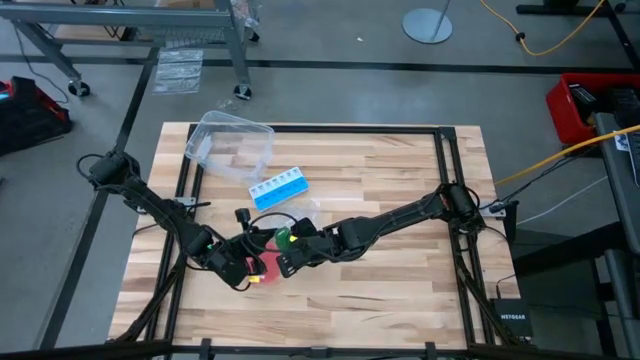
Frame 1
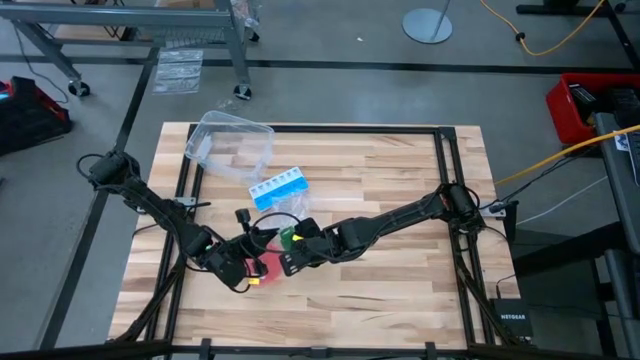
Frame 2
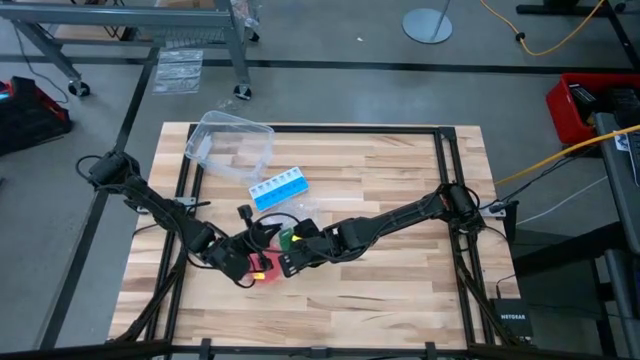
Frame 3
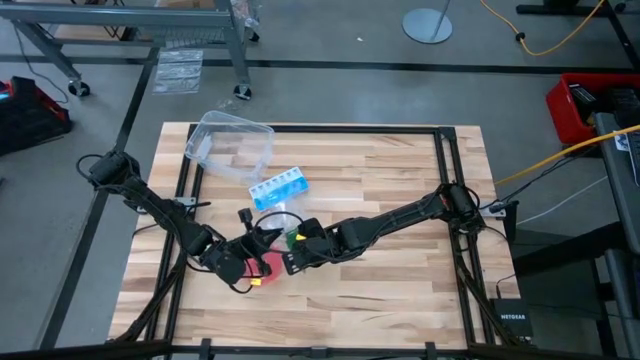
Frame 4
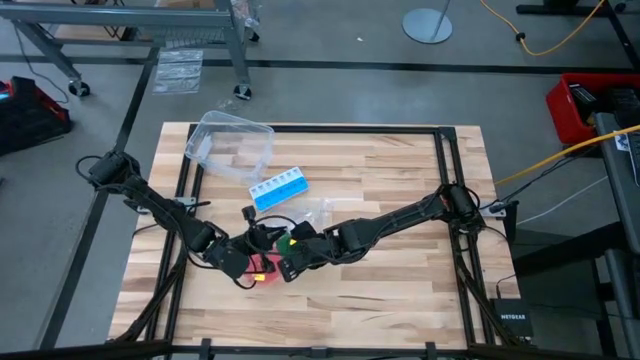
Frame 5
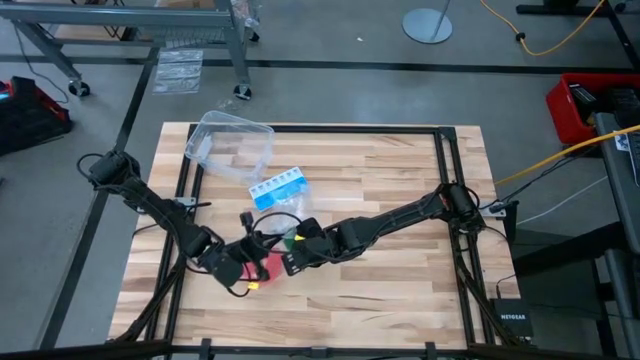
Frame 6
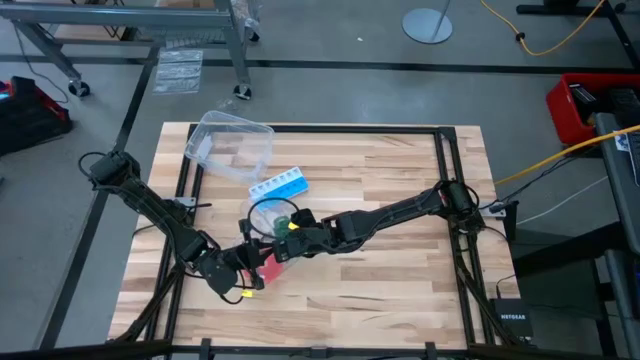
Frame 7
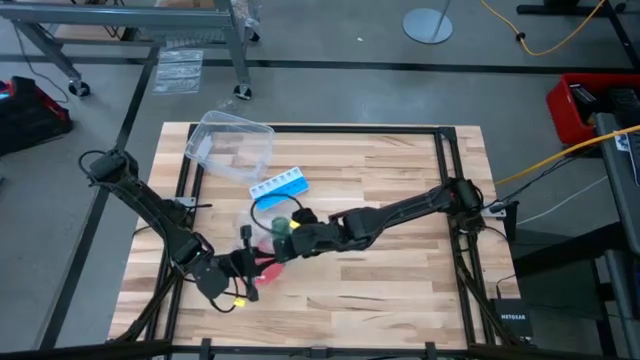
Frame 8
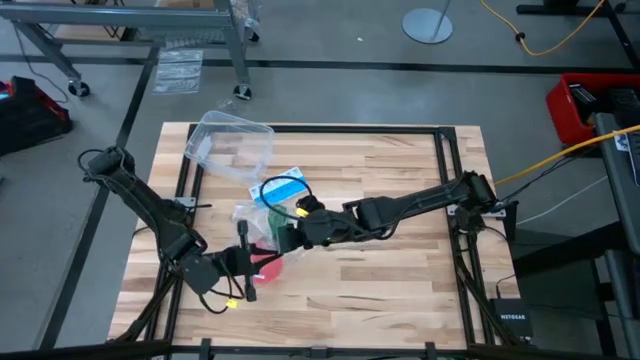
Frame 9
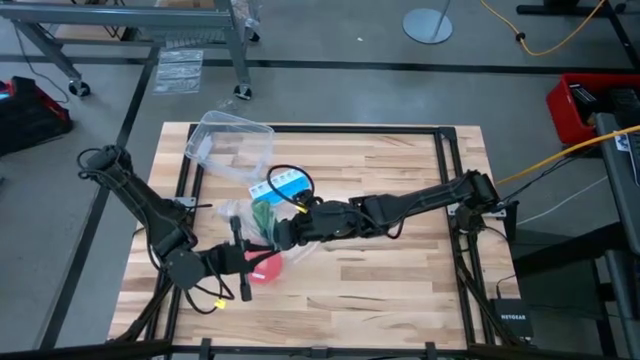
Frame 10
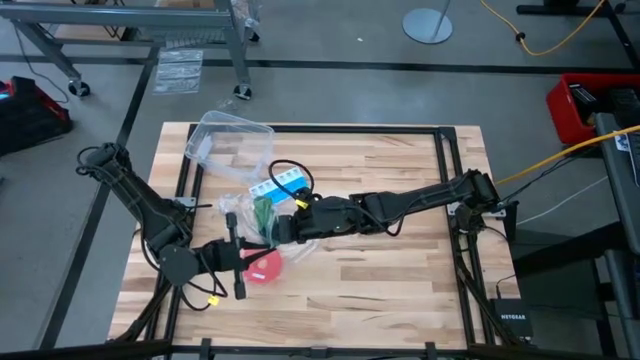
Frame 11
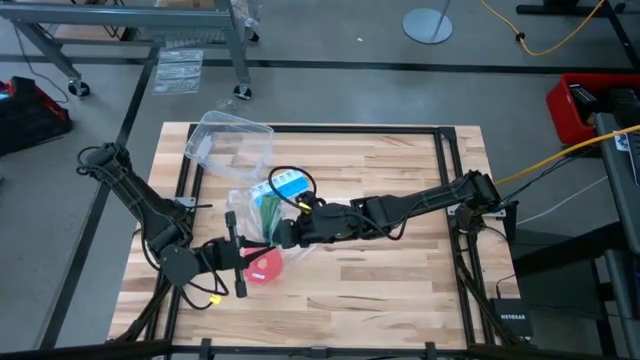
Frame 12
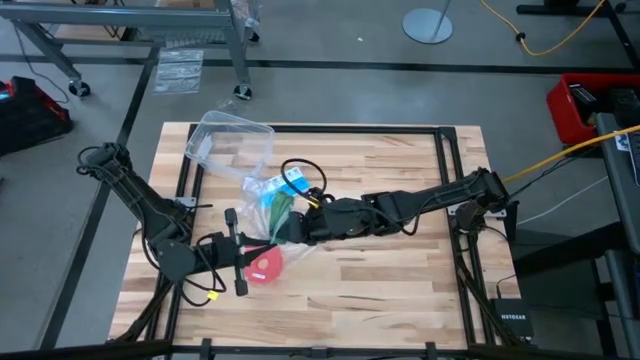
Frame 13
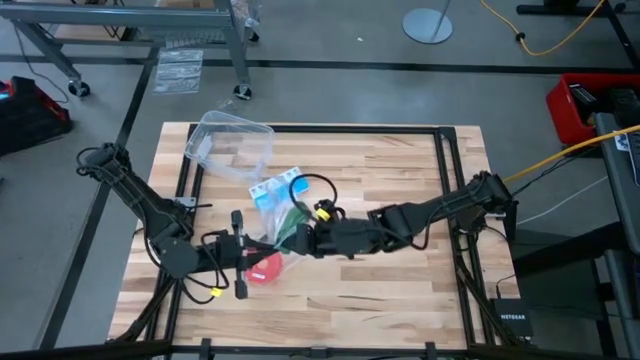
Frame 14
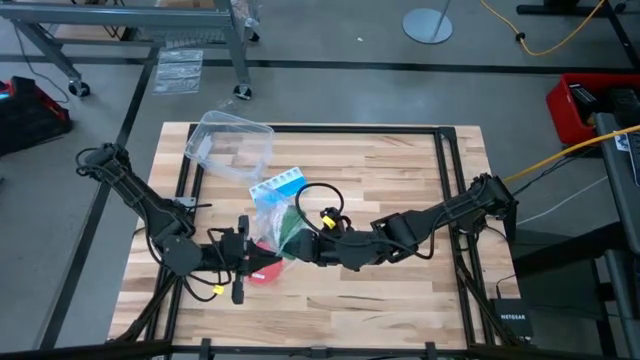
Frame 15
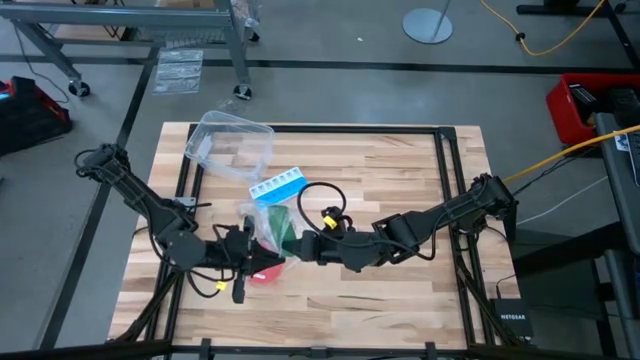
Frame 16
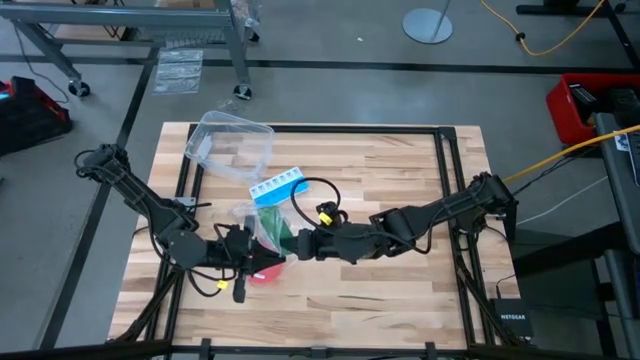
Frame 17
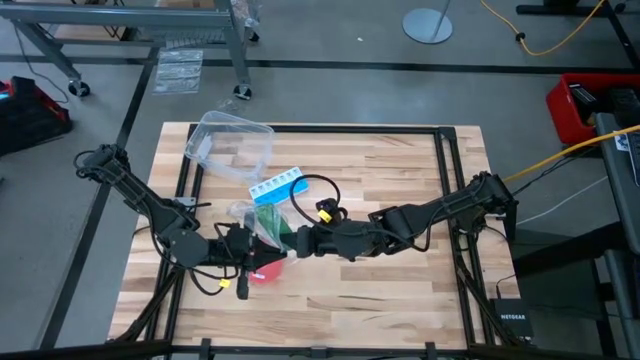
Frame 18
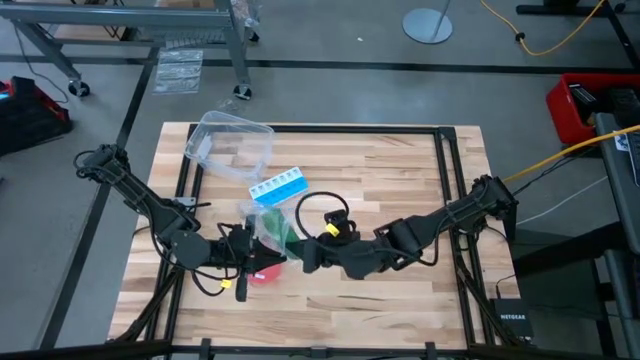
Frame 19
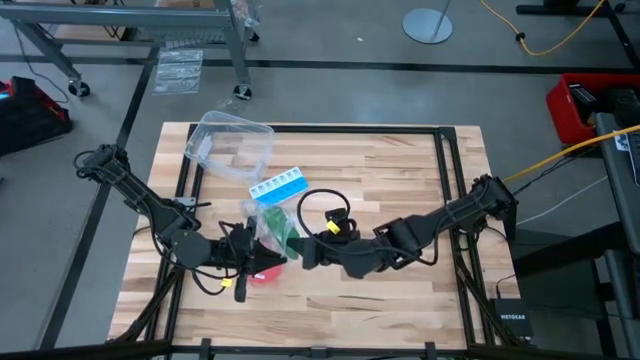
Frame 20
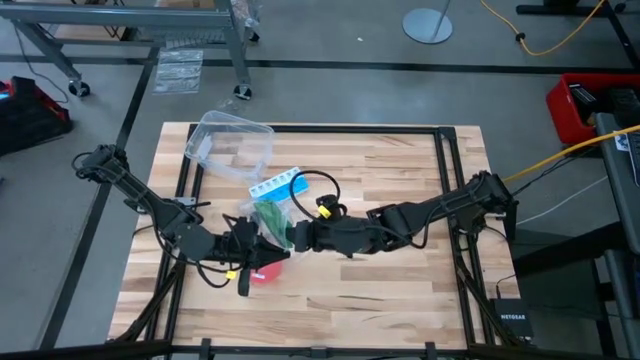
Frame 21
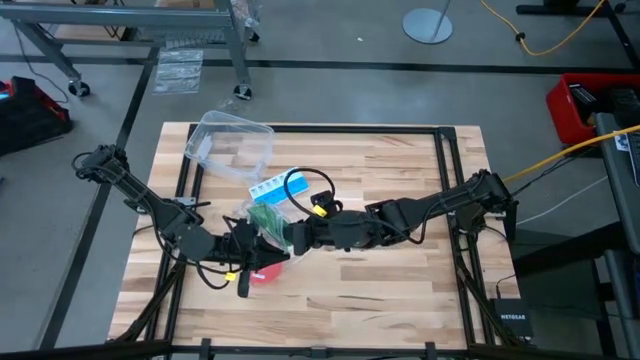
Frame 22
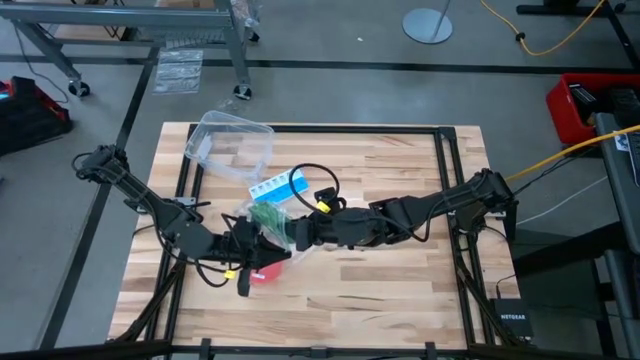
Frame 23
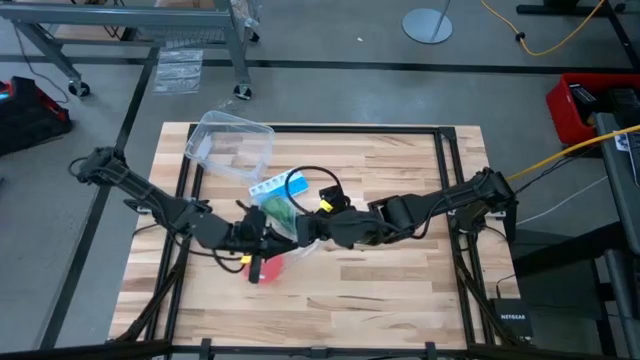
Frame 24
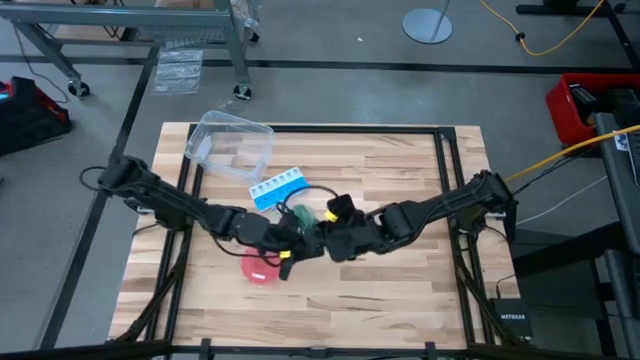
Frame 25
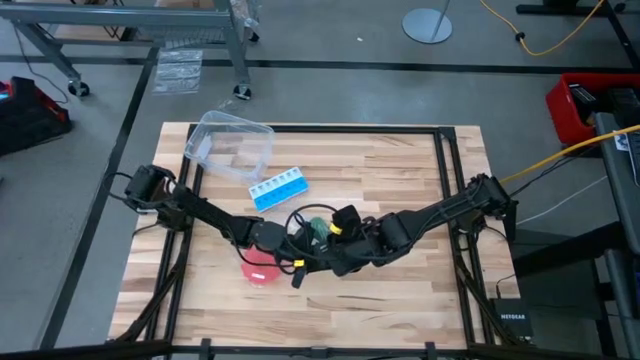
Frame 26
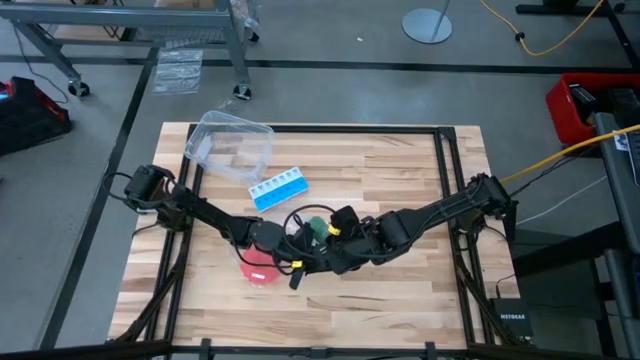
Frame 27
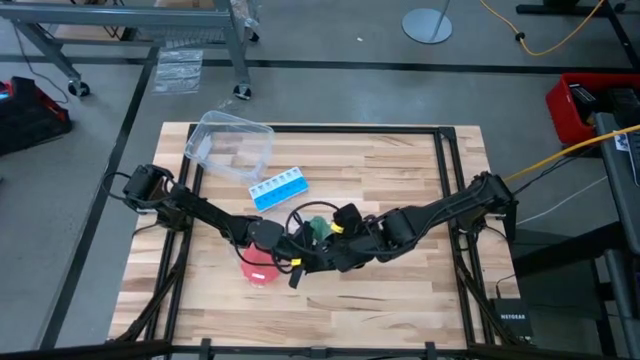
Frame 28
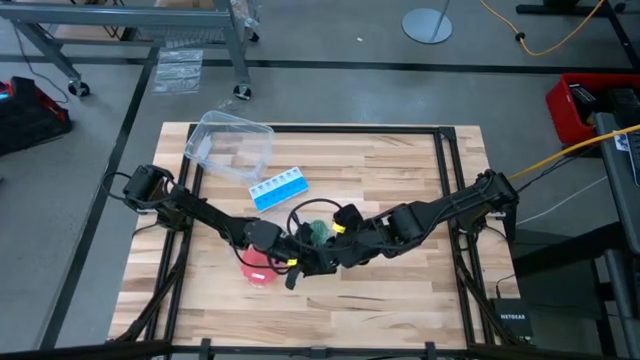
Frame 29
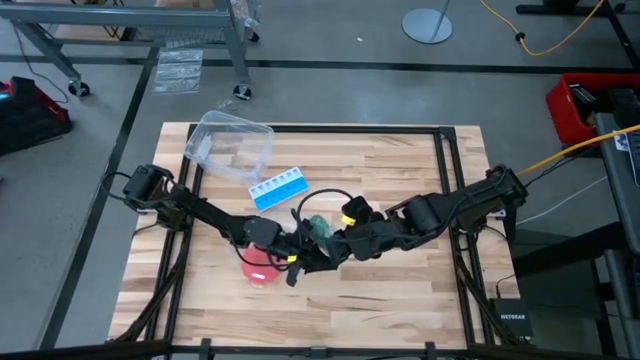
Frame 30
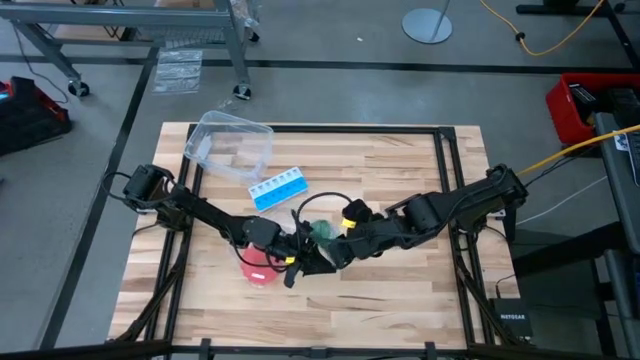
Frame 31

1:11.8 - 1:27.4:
Task: Roll bandage
Put the green bandage into the transparent zip bag

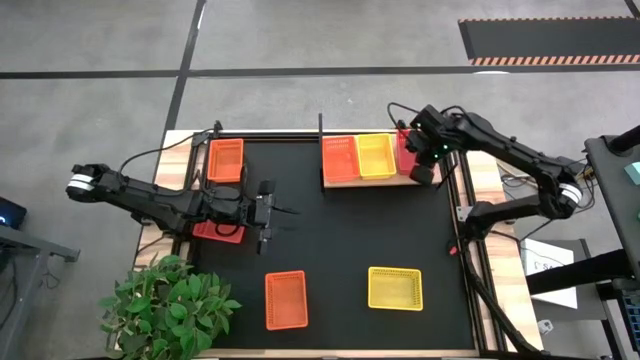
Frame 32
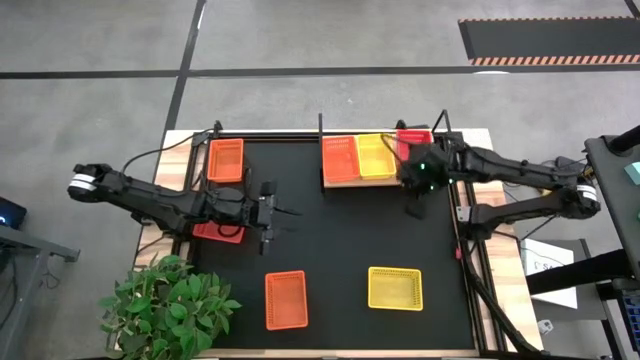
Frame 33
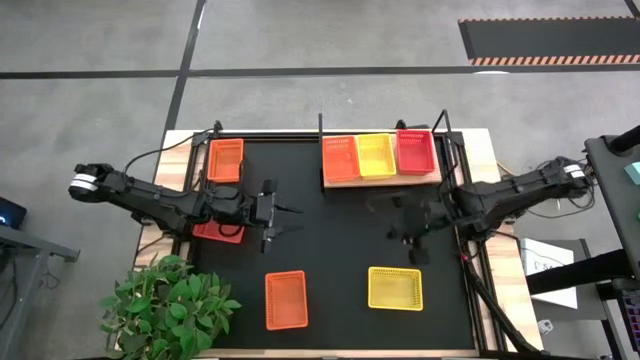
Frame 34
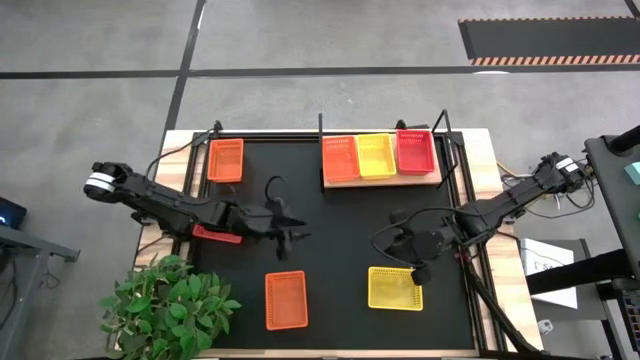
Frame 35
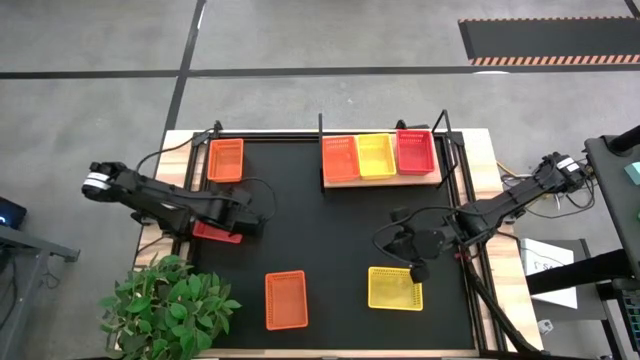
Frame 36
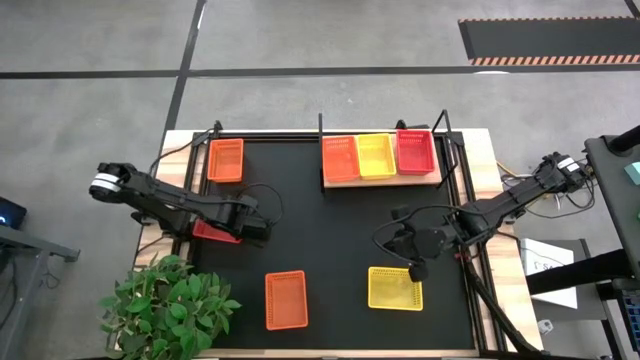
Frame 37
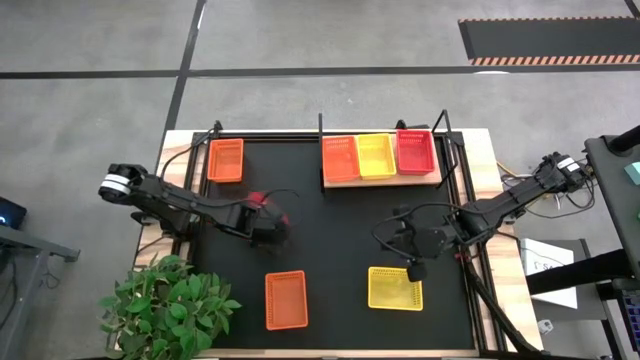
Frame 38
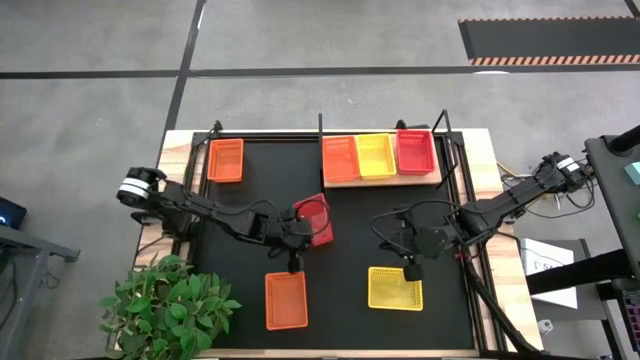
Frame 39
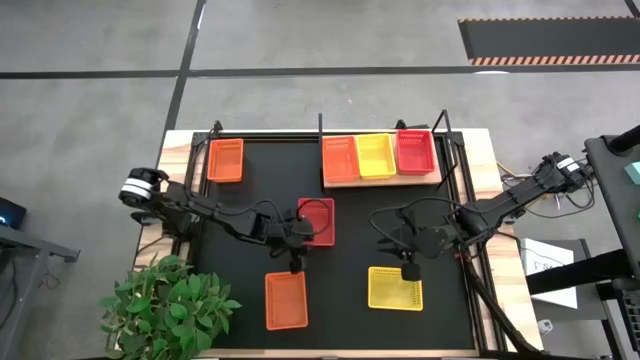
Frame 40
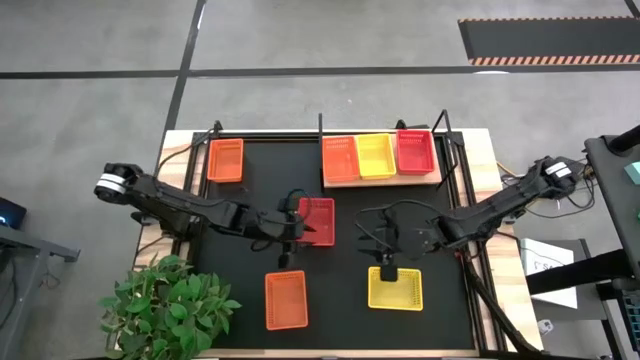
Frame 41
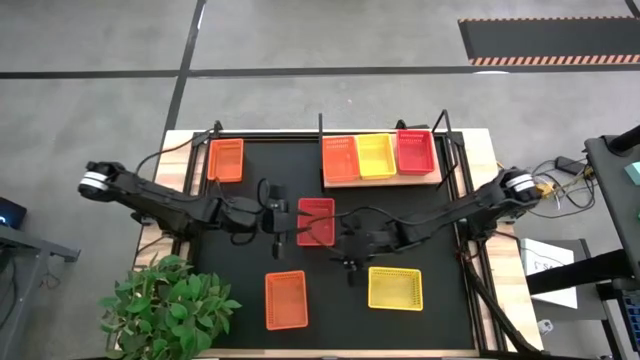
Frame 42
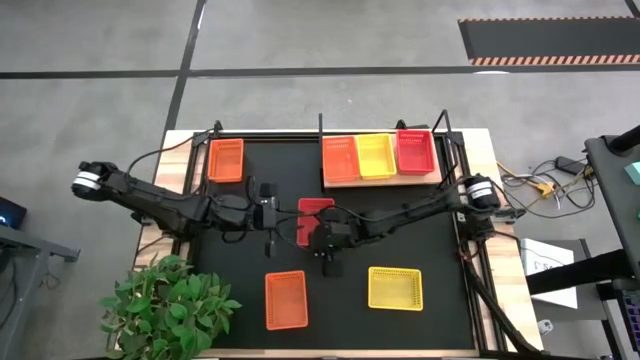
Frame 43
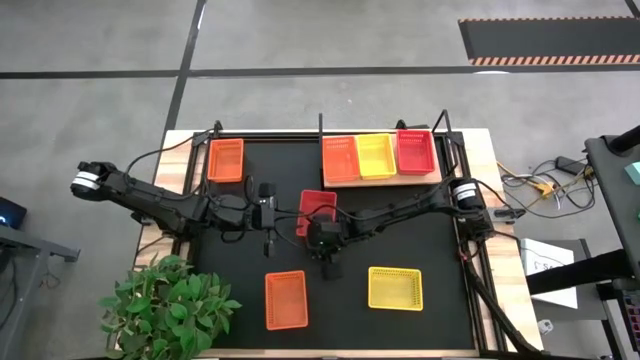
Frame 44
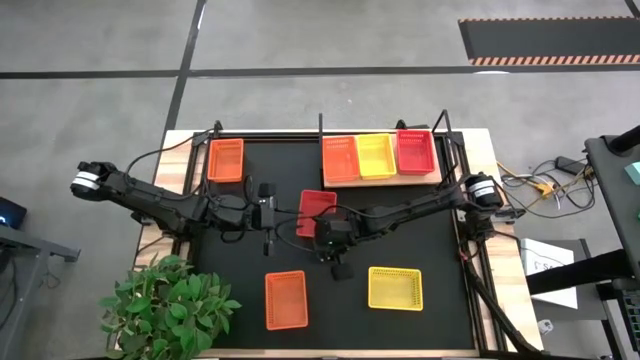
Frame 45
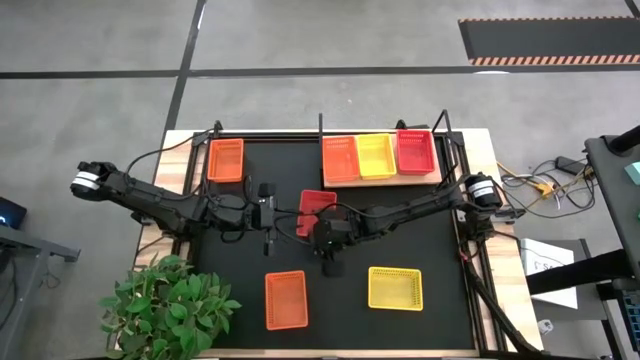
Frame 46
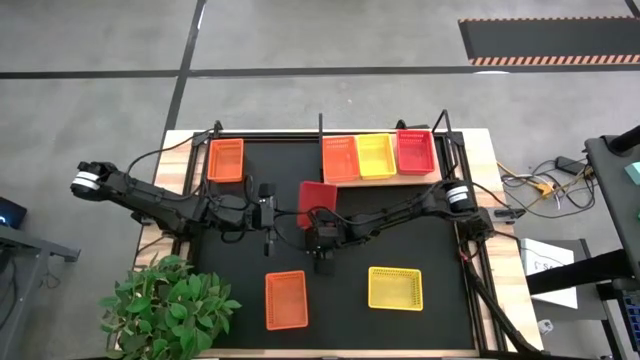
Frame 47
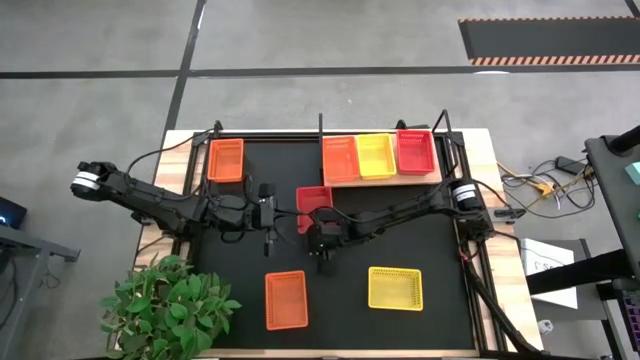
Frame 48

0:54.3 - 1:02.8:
Task: Stack baskets on shelf by color
Stack the red bin on the stacked red bins on the shelf
